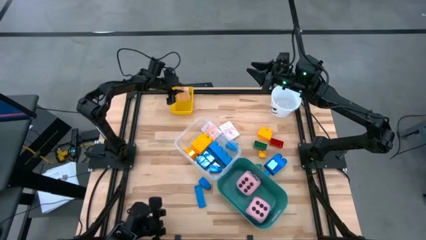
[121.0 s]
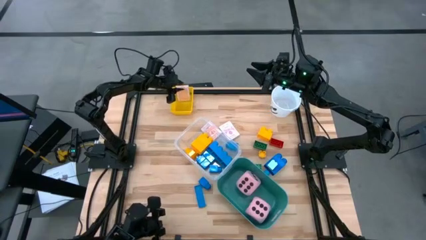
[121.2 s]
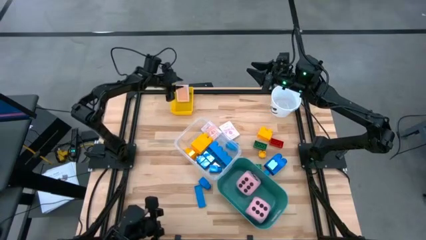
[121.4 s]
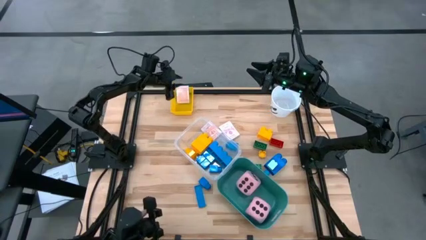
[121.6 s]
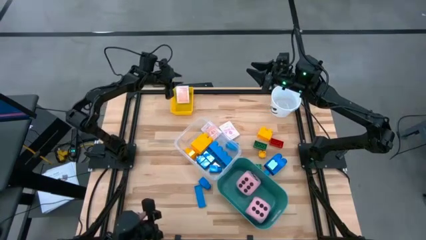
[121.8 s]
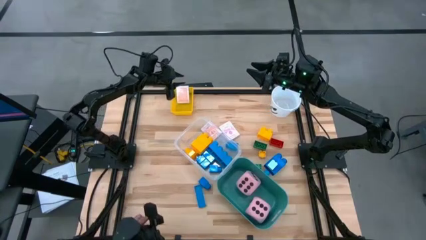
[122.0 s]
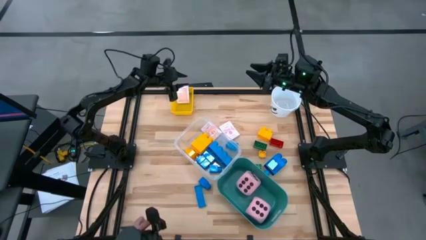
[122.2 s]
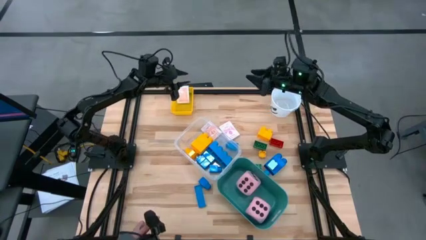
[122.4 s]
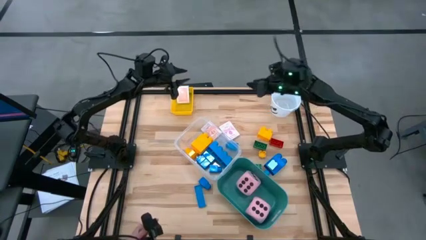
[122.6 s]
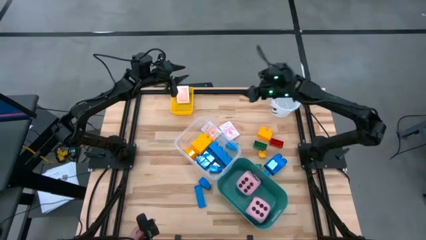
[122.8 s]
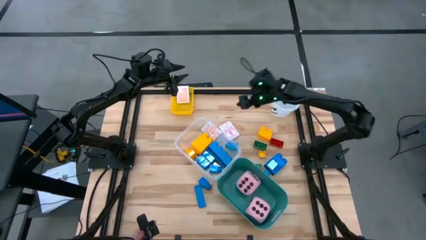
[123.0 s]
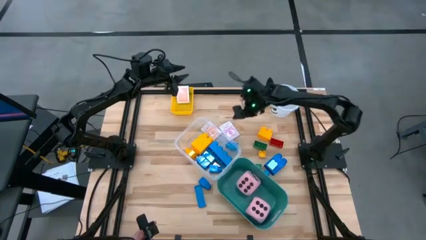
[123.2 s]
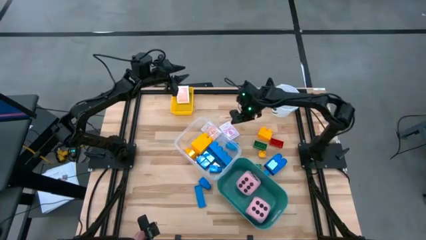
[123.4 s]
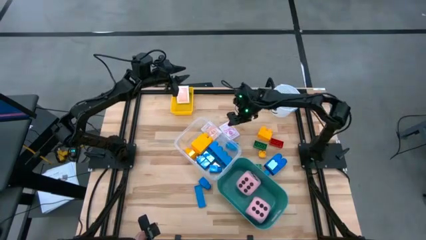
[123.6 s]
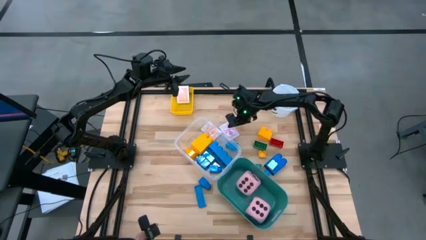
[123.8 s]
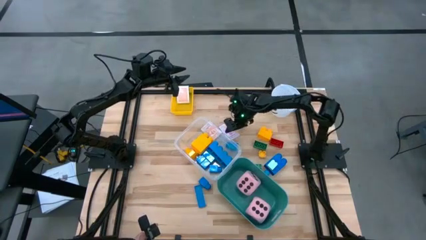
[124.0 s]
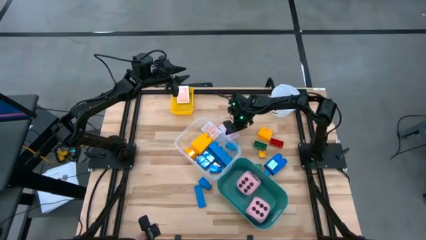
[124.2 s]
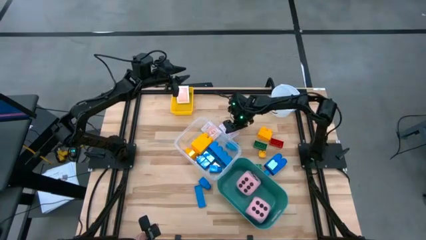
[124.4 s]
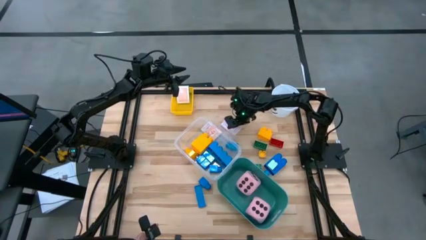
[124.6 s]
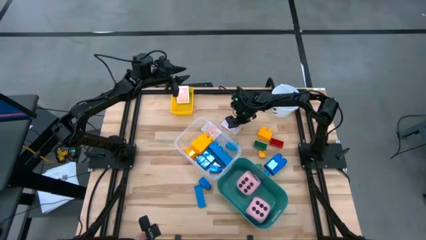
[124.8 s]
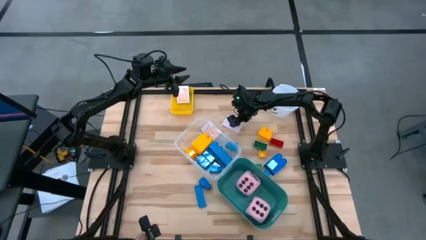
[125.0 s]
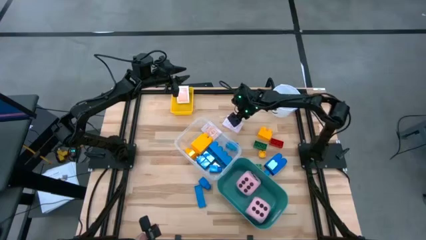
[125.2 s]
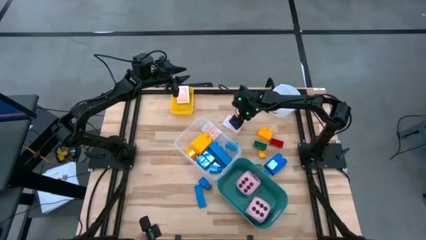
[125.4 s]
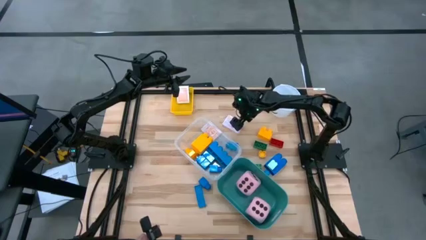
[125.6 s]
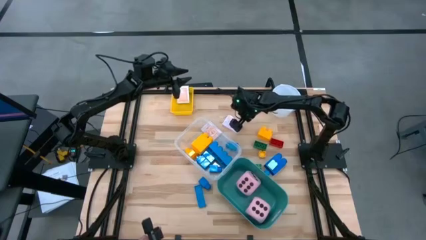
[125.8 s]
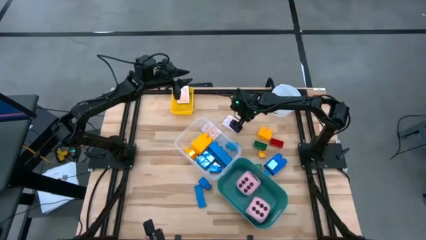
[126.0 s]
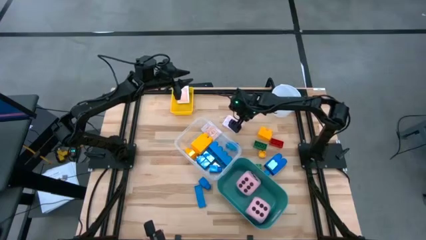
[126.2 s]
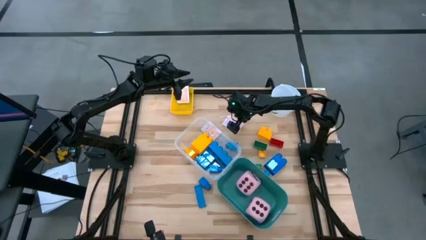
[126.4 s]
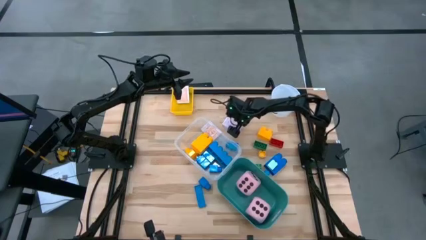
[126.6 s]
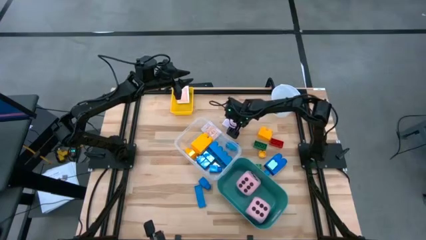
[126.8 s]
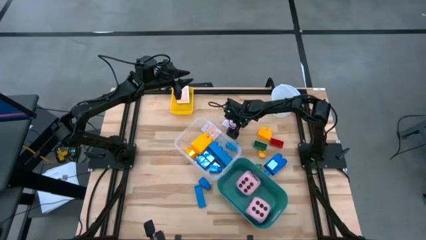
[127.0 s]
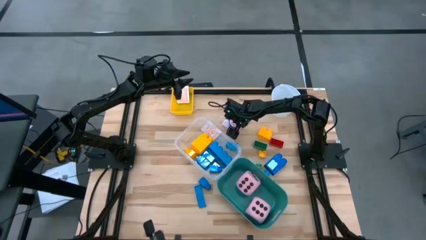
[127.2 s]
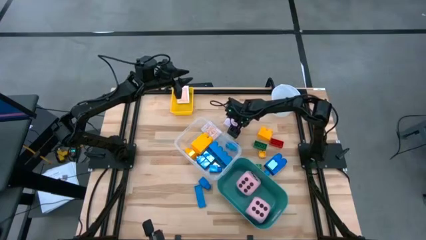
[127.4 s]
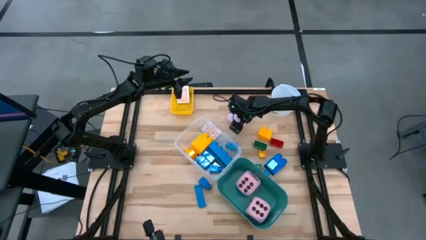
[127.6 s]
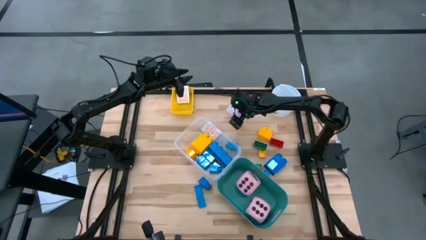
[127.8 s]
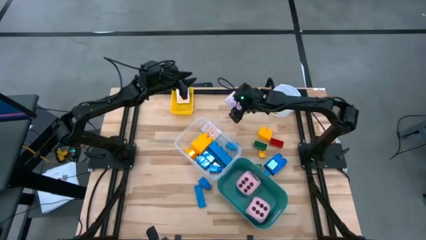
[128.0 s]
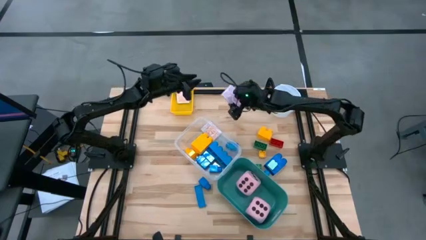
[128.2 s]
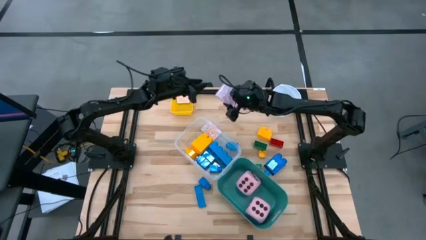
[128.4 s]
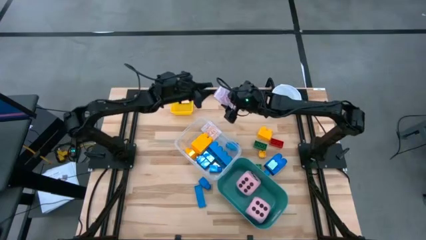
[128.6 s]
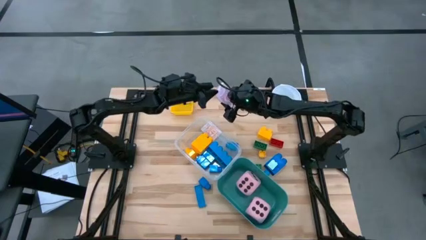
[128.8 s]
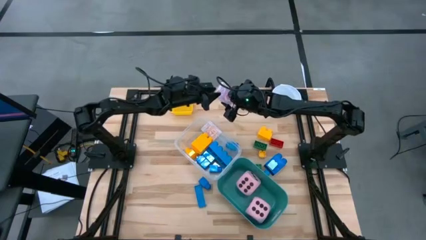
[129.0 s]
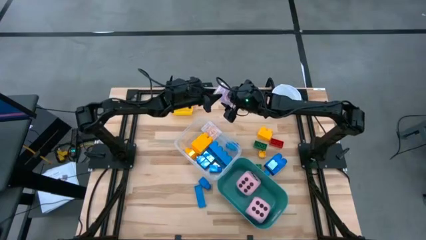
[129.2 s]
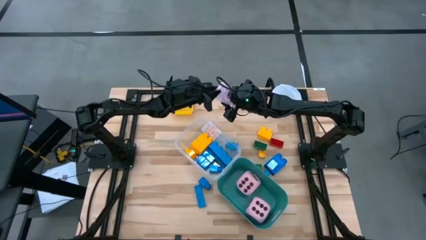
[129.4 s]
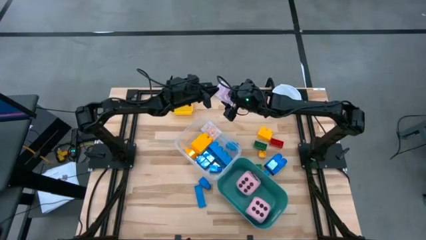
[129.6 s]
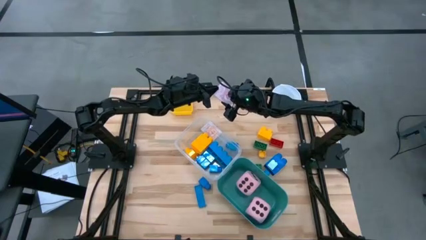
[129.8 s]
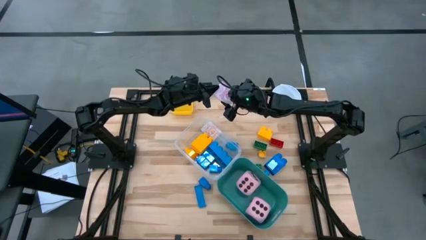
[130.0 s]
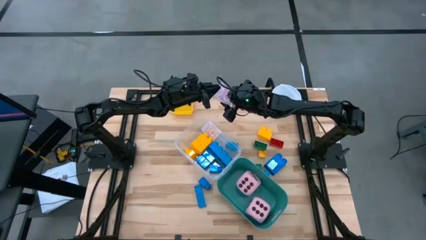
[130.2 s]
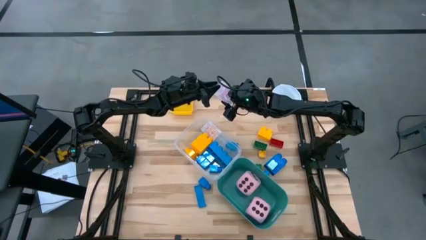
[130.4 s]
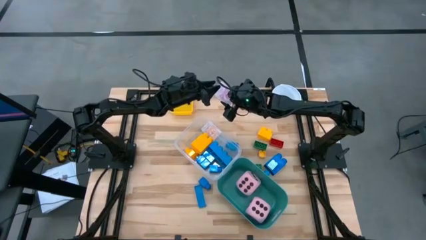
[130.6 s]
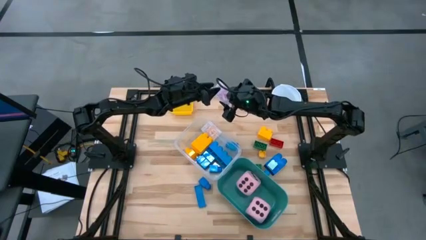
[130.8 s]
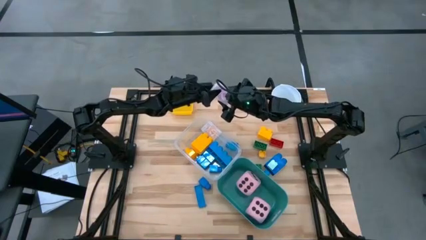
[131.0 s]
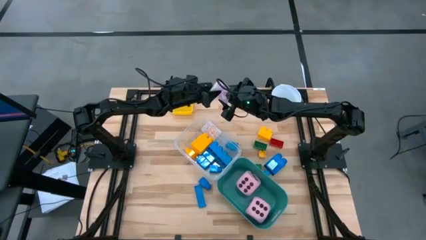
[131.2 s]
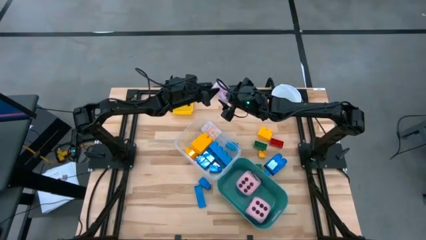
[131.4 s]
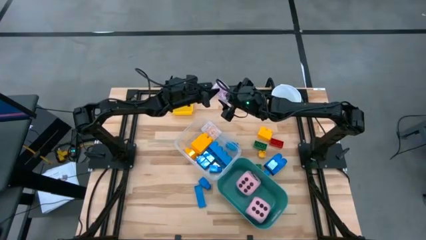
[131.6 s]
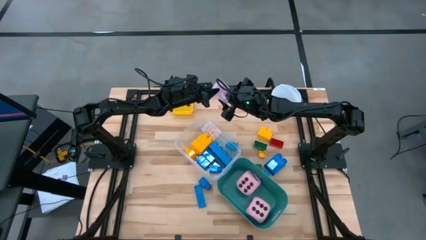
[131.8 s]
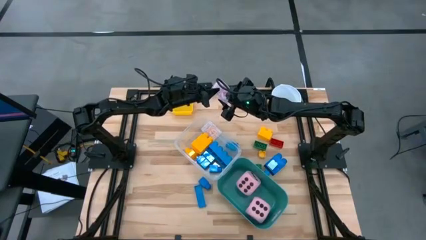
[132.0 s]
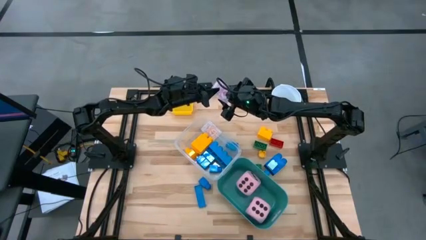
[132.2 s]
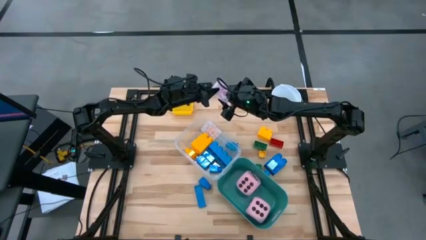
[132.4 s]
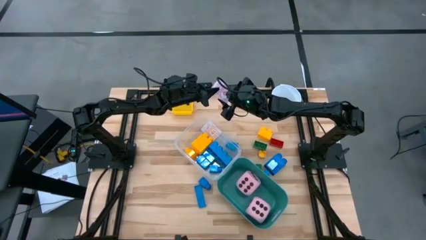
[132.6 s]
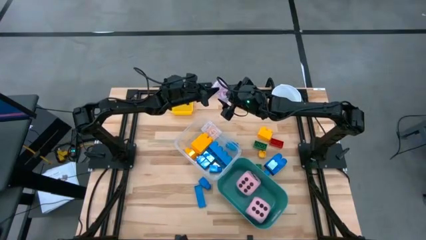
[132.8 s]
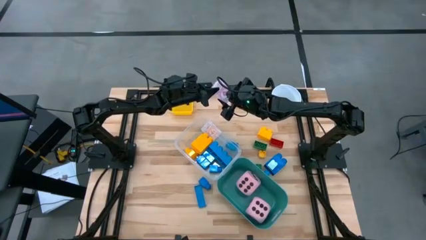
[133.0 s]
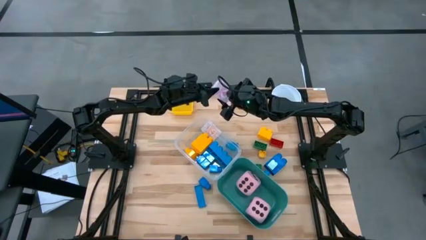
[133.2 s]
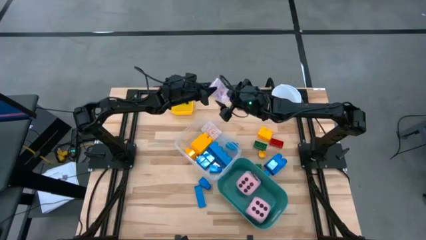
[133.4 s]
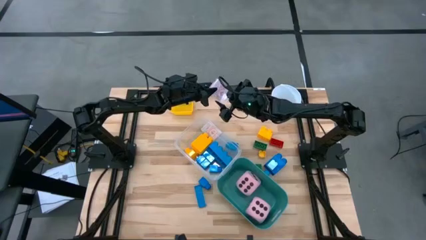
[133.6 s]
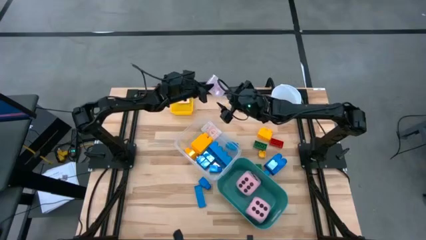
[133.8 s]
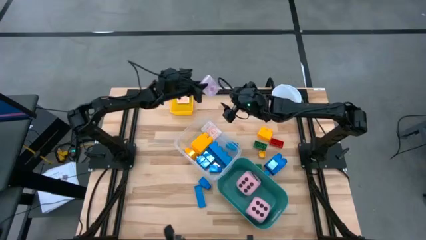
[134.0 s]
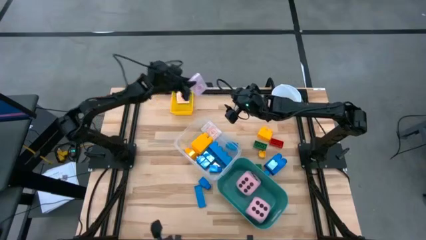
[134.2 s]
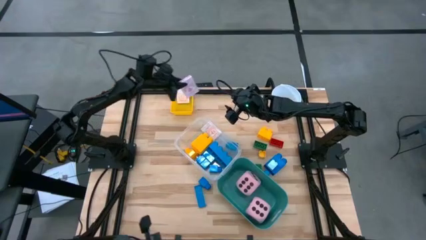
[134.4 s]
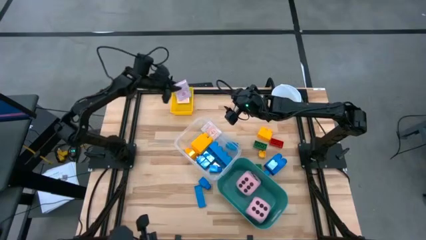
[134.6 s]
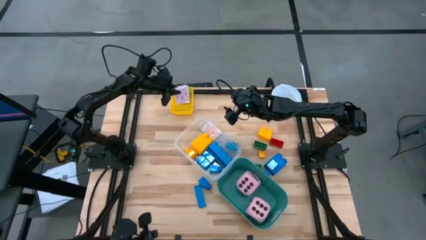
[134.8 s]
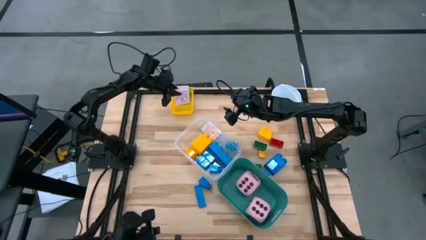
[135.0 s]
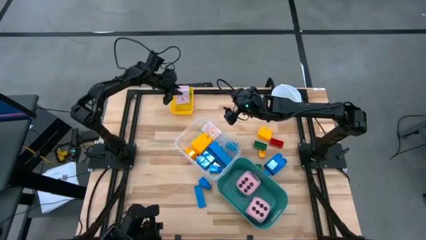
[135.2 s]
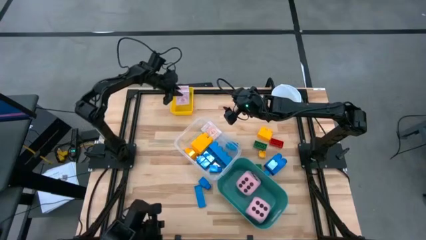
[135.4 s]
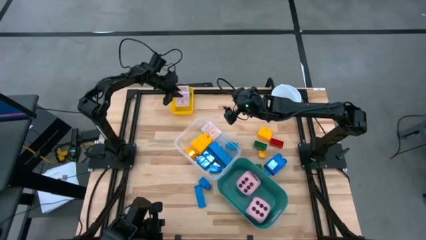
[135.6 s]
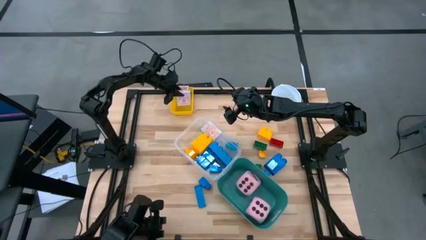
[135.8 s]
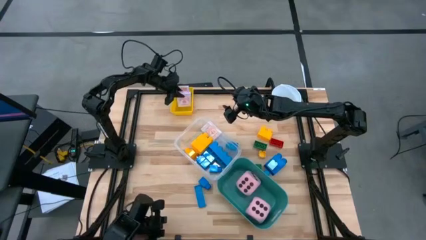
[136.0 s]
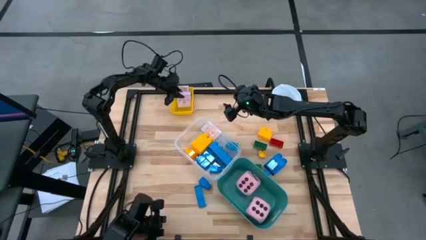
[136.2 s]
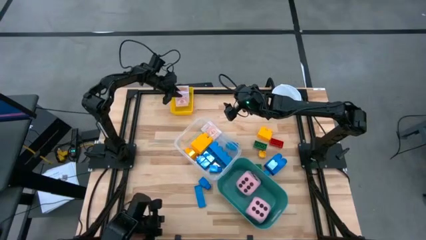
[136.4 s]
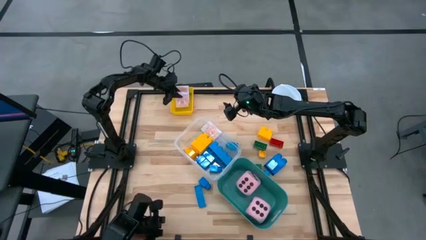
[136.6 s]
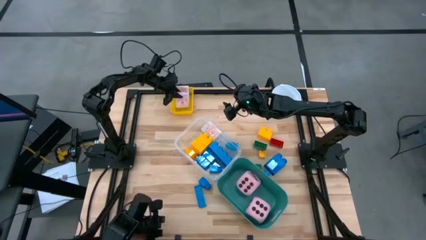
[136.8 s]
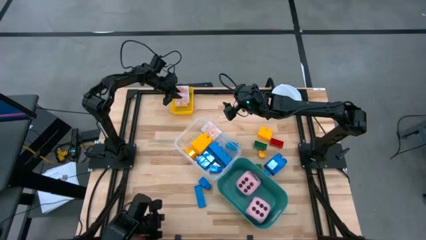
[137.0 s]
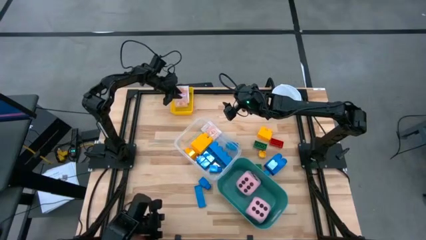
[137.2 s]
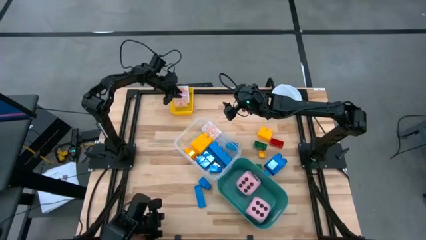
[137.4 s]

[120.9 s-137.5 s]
Task: Pick & Place Toys
Put the pink deck of cards into the yellow bin
